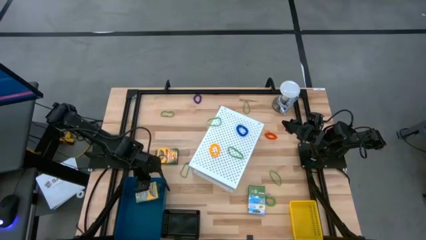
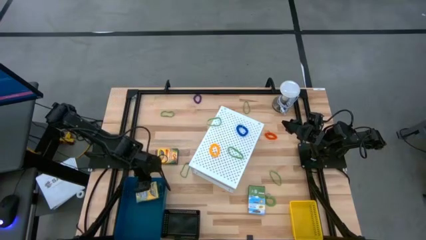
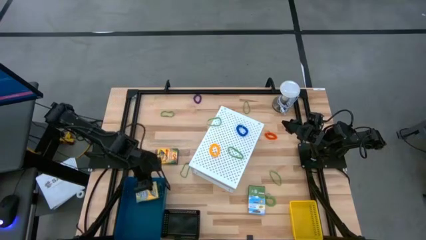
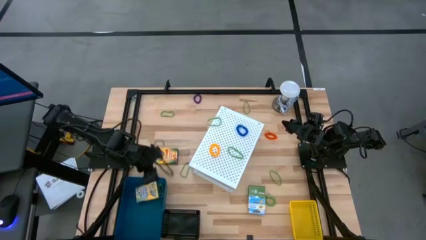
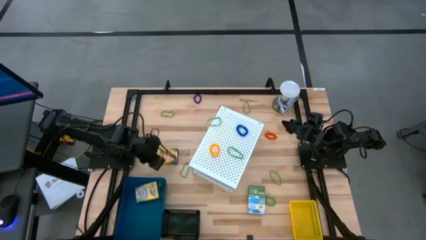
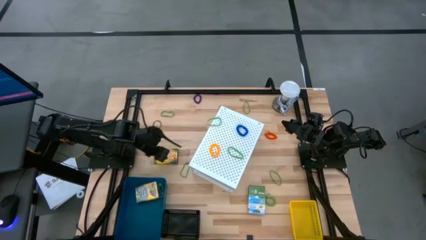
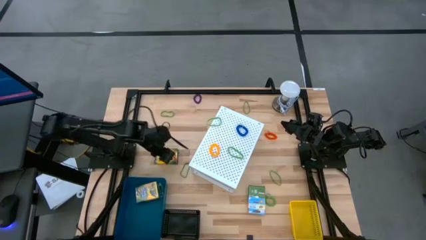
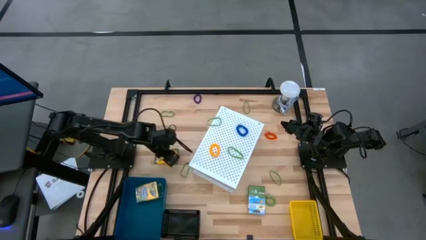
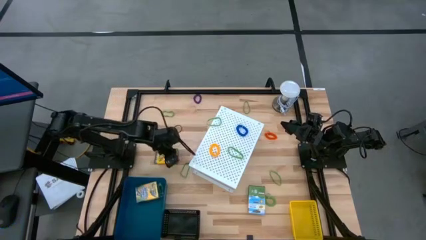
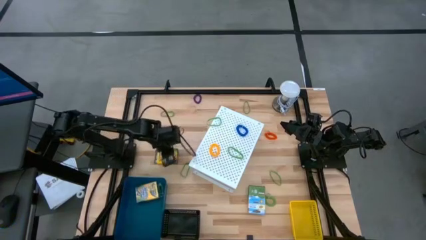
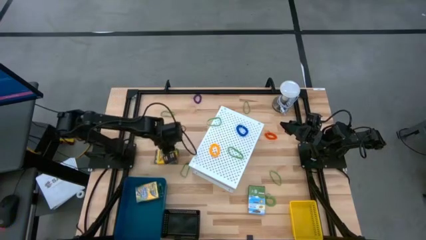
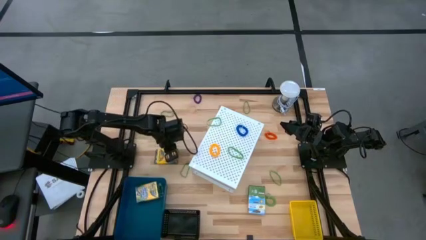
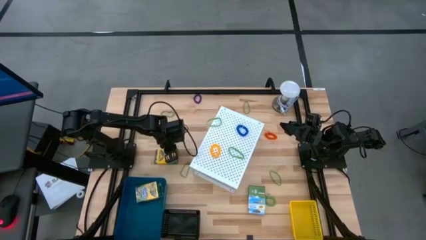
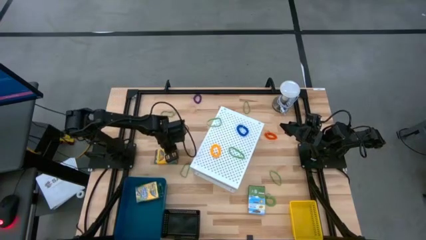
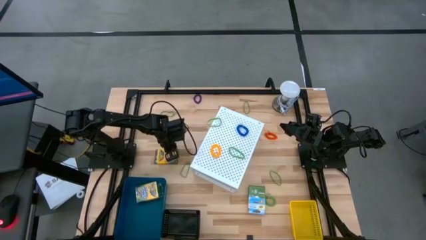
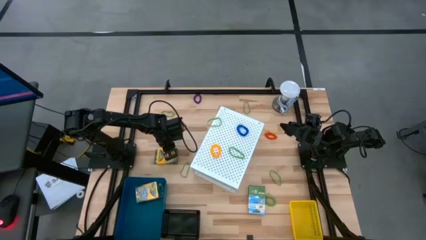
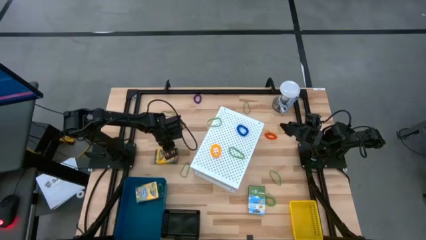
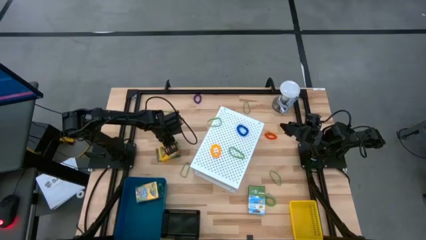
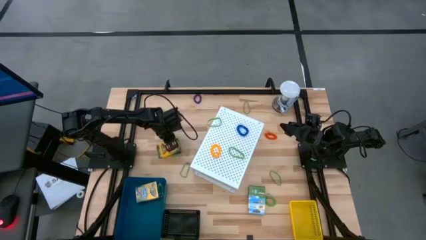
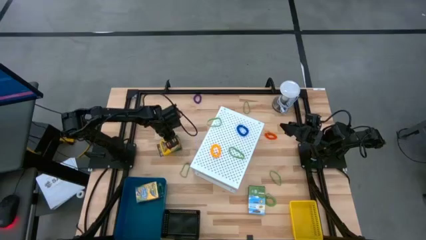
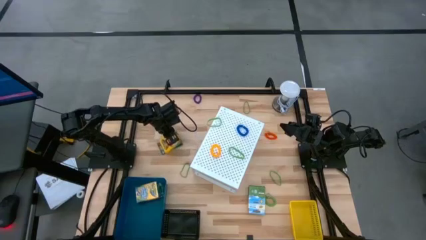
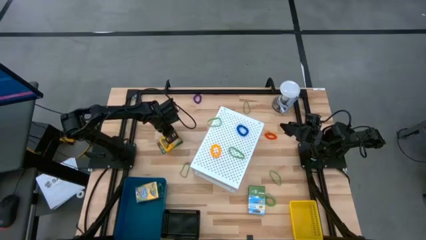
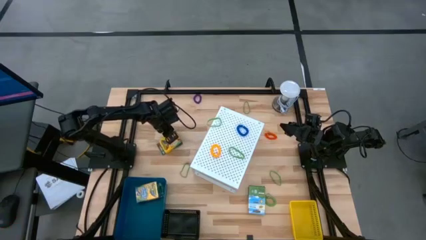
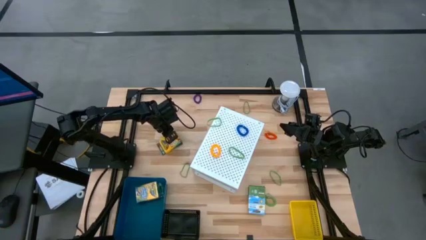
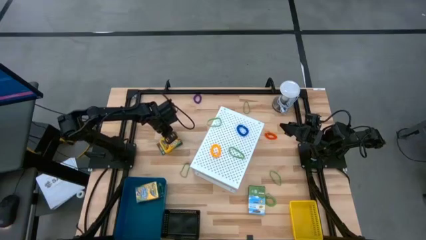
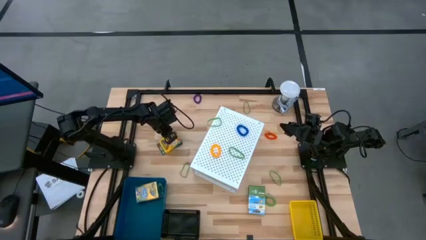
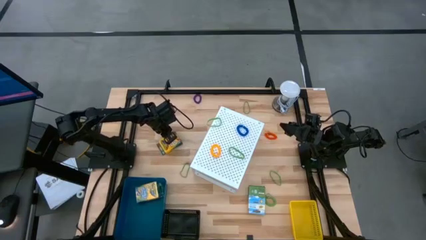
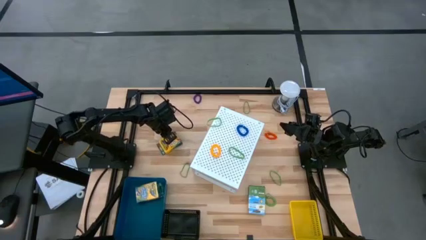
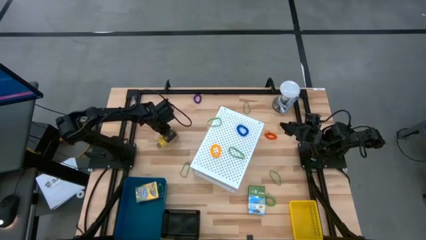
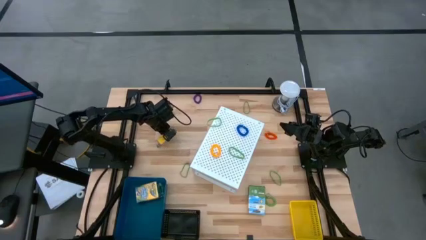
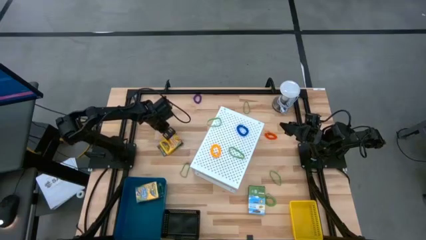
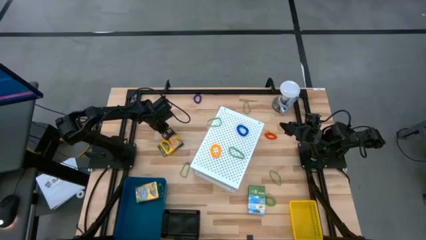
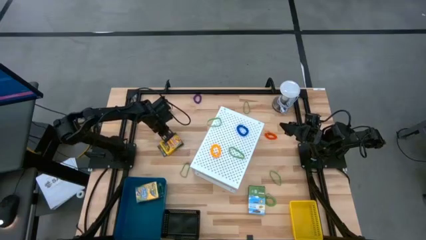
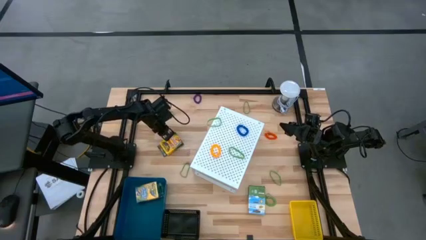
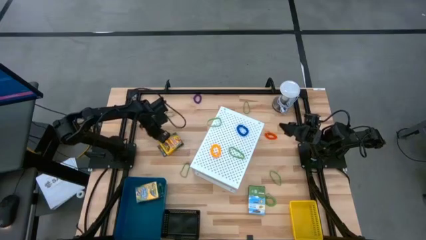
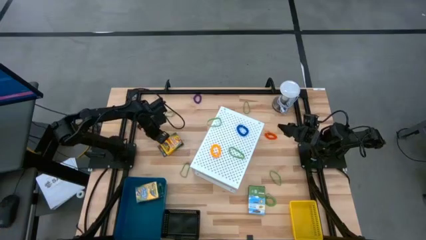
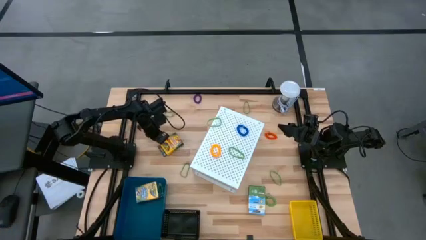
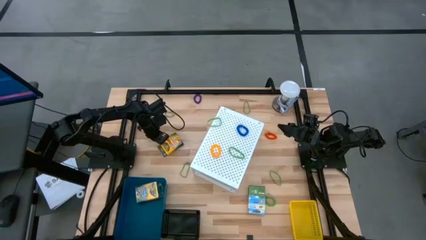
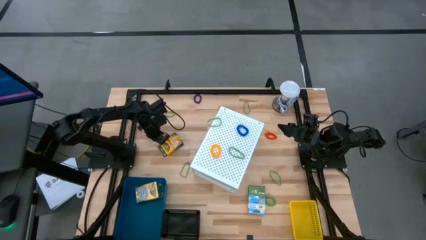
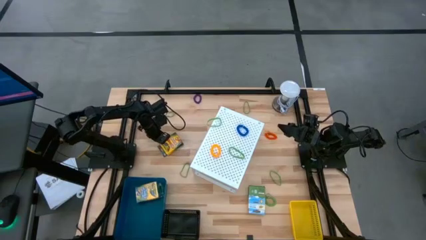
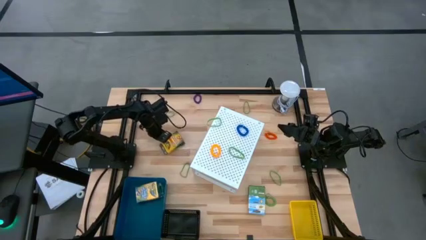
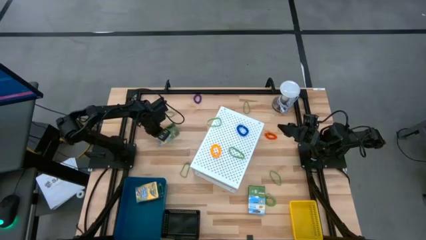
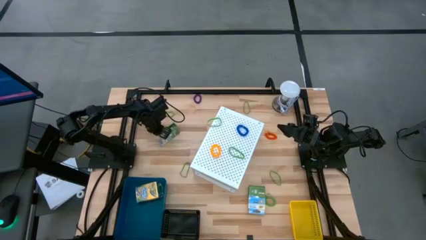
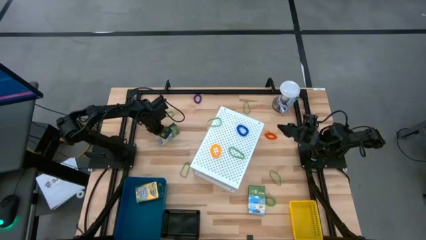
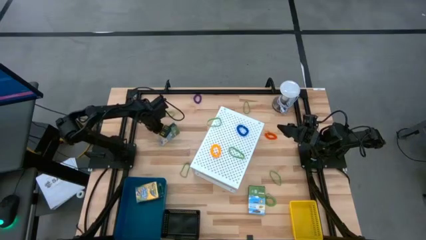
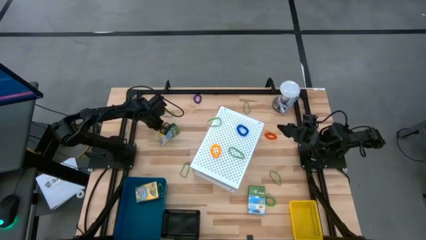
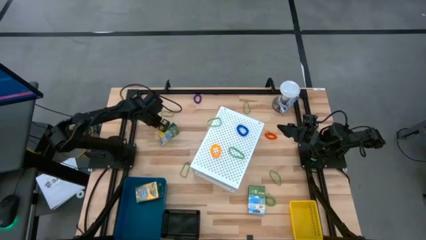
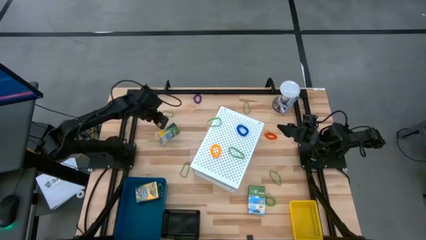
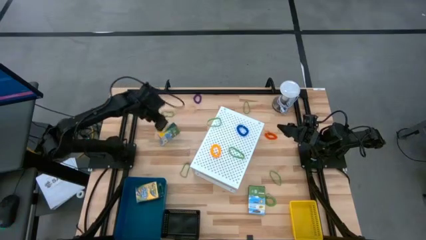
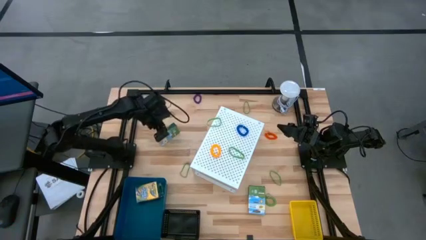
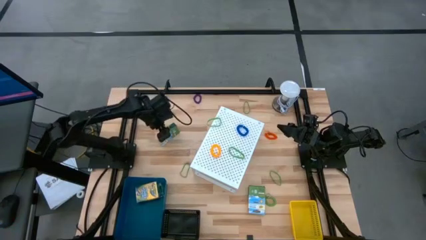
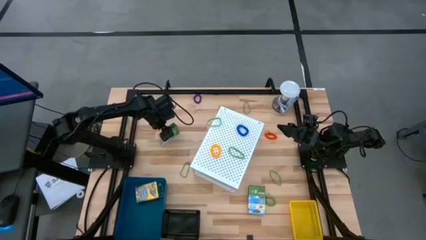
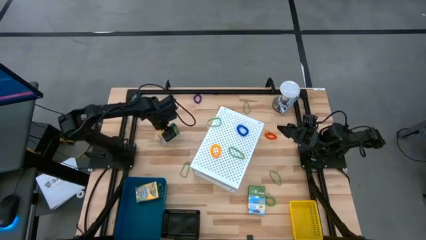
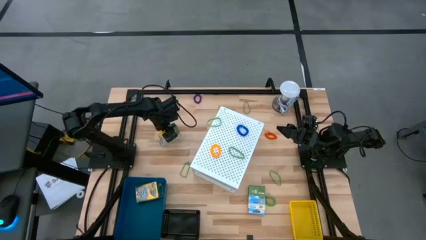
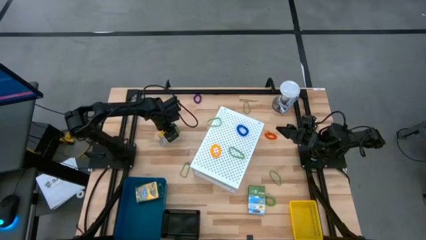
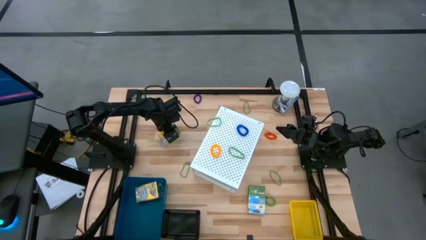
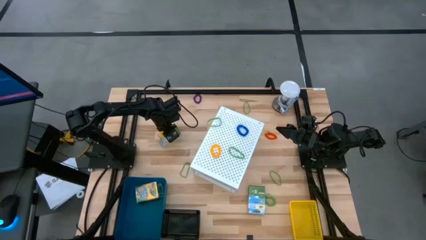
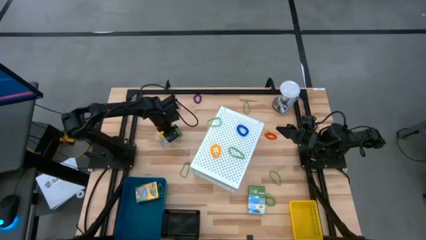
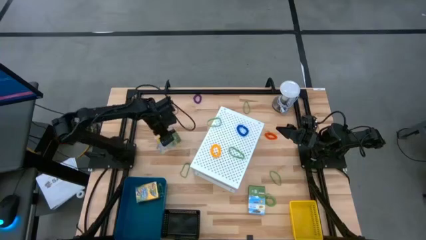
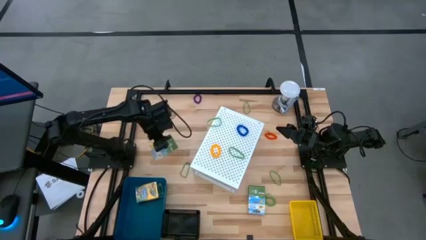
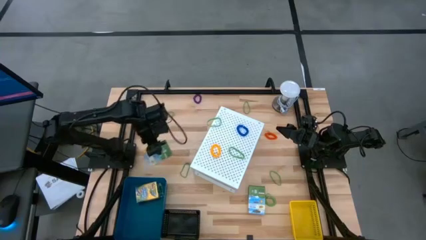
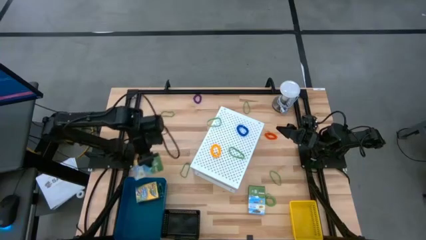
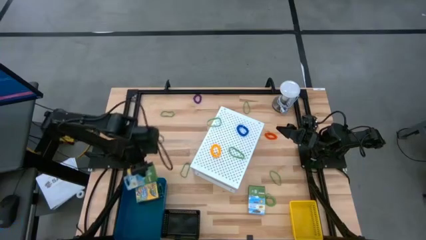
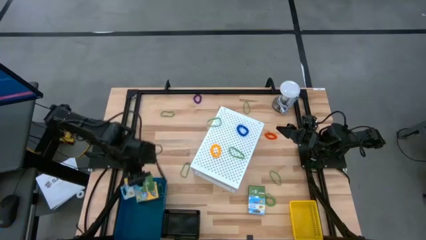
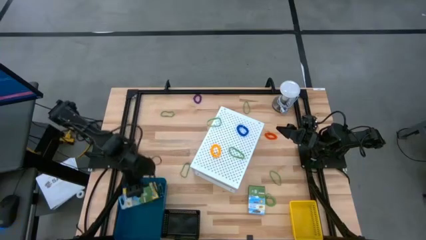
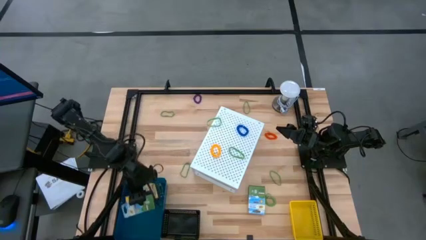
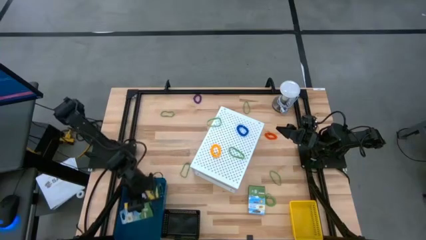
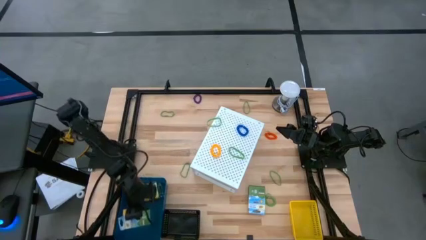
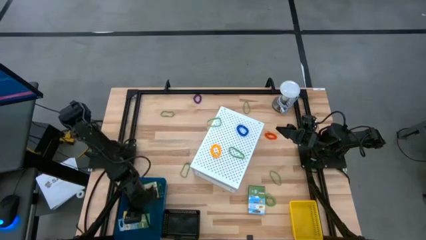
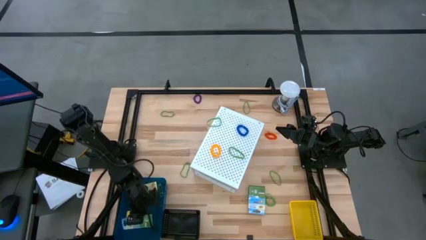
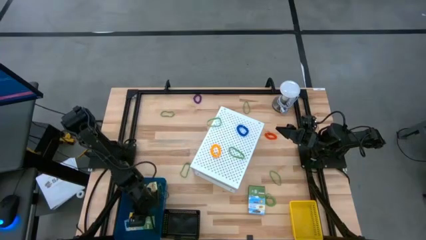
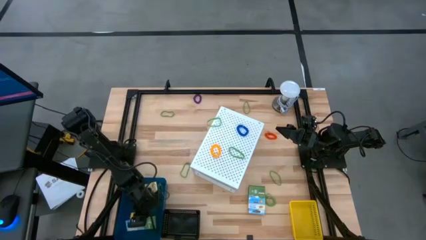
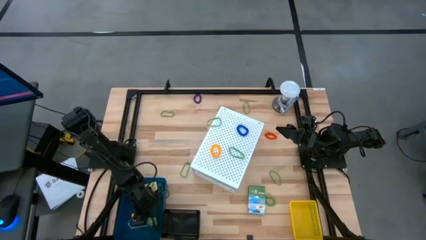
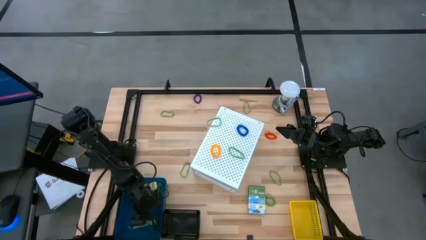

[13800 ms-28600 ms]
Task: Pick & Place Office Desk Supplies
Put the yellow crayon box into the blue bin
